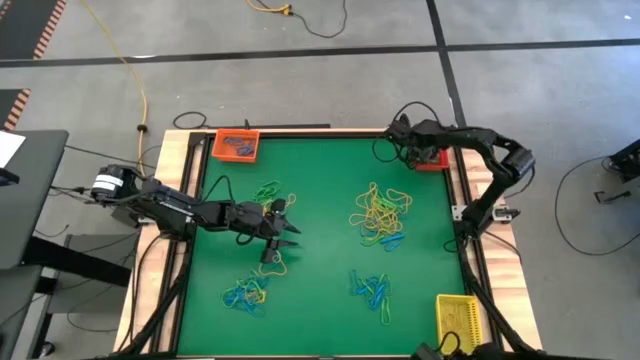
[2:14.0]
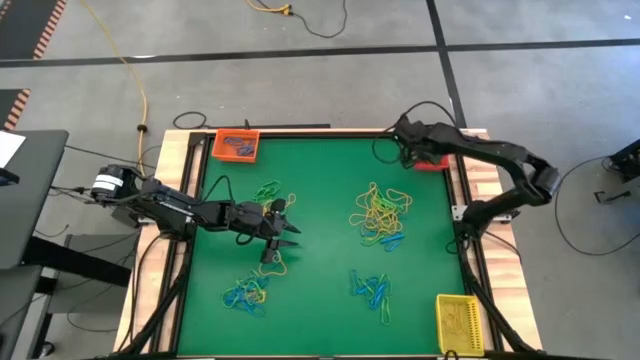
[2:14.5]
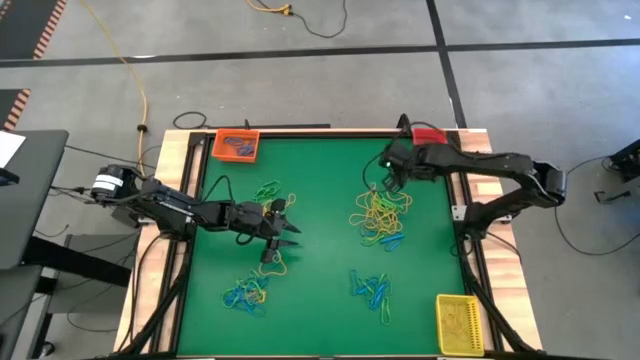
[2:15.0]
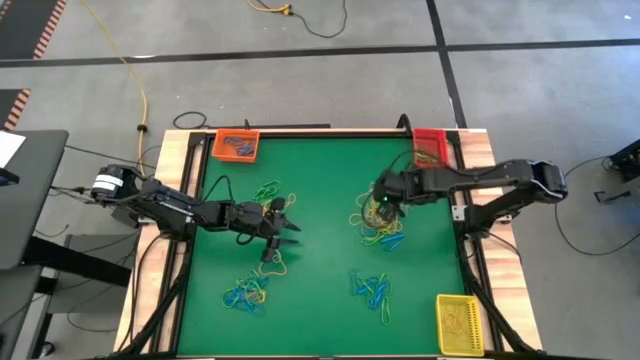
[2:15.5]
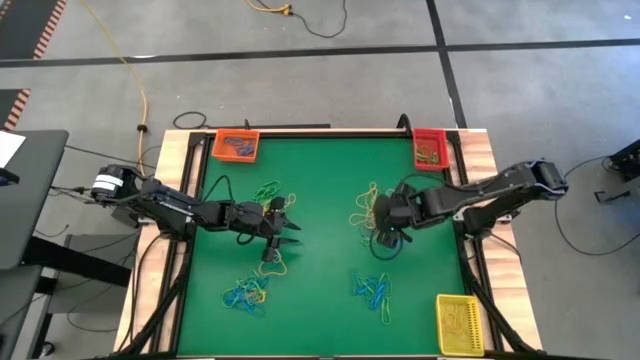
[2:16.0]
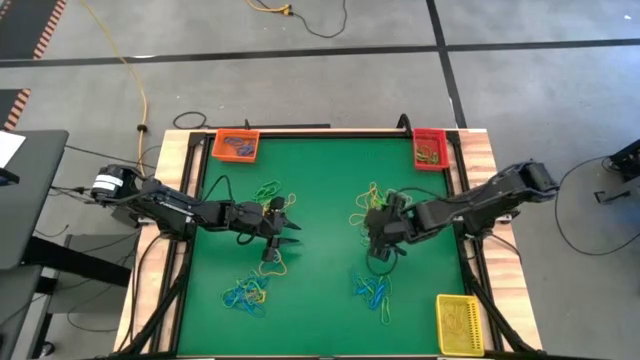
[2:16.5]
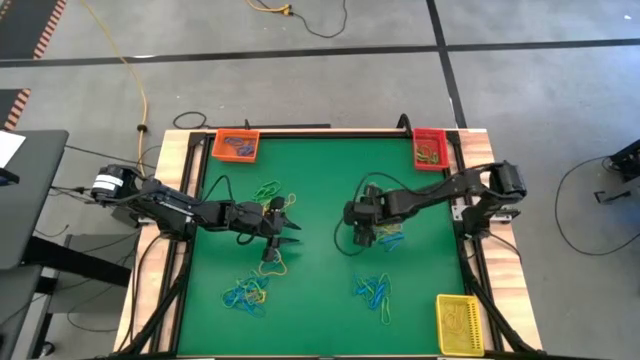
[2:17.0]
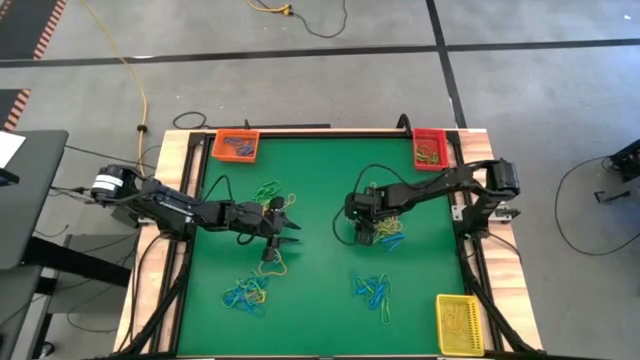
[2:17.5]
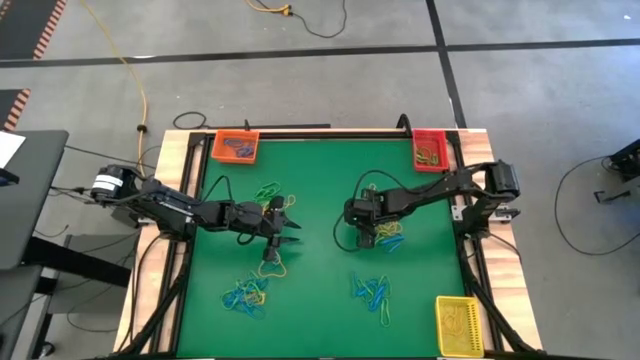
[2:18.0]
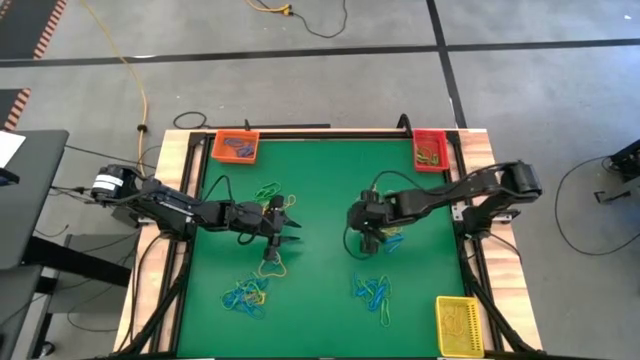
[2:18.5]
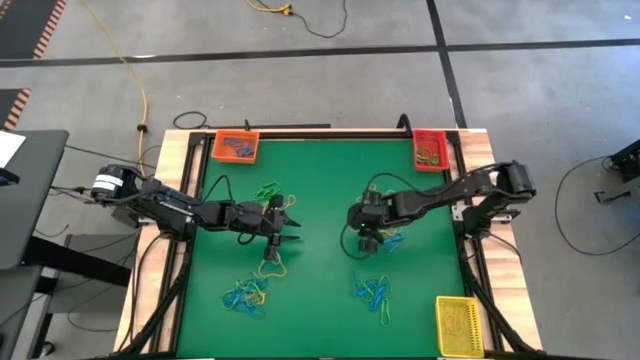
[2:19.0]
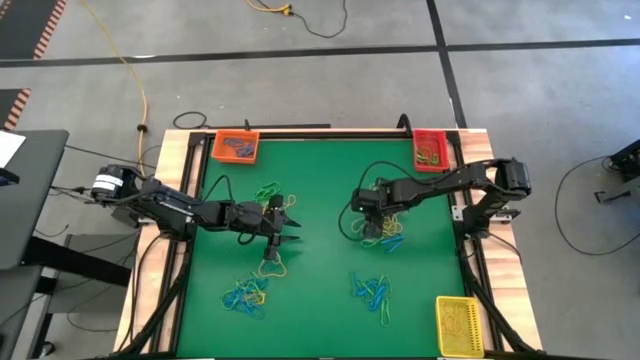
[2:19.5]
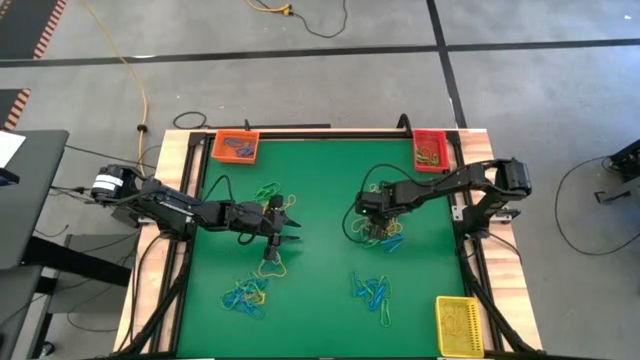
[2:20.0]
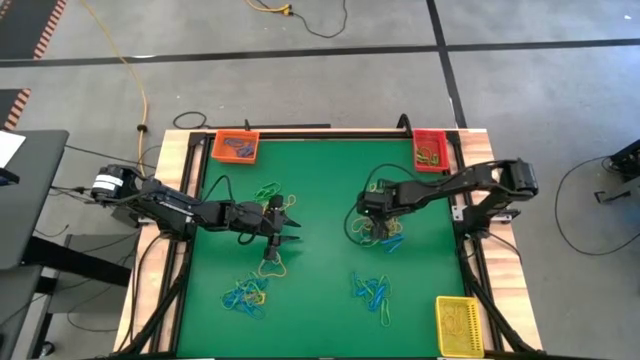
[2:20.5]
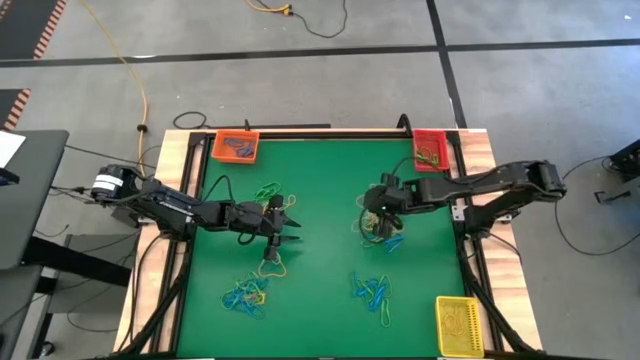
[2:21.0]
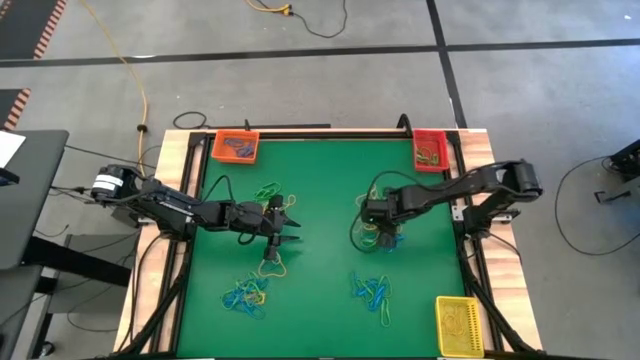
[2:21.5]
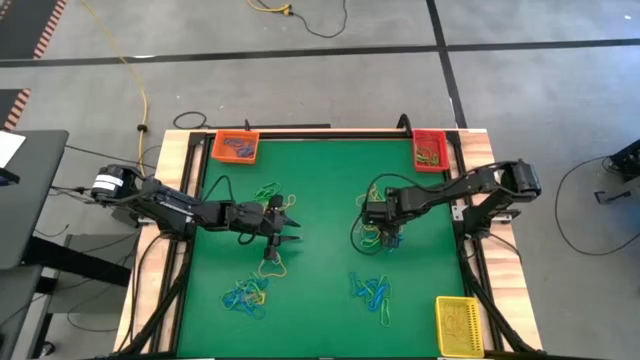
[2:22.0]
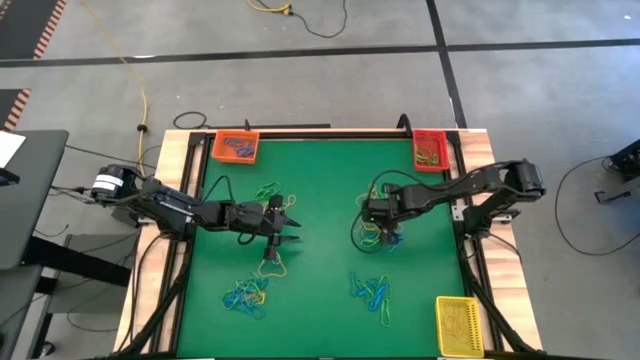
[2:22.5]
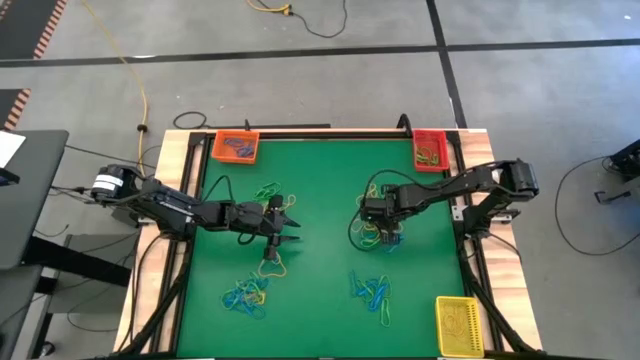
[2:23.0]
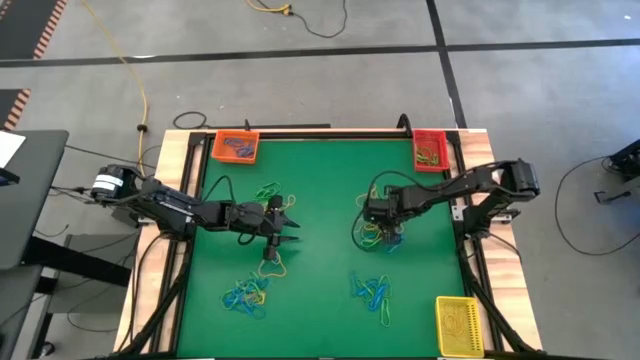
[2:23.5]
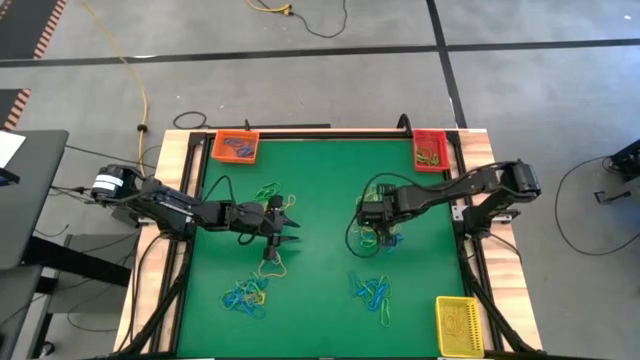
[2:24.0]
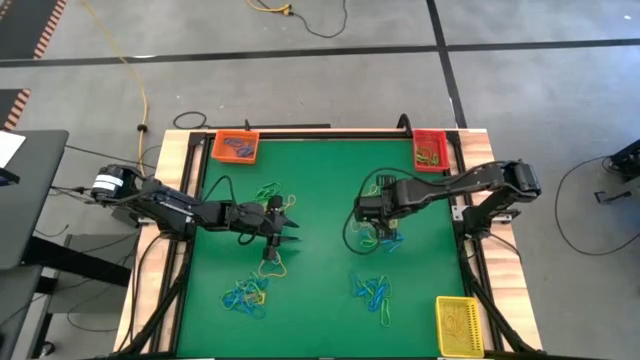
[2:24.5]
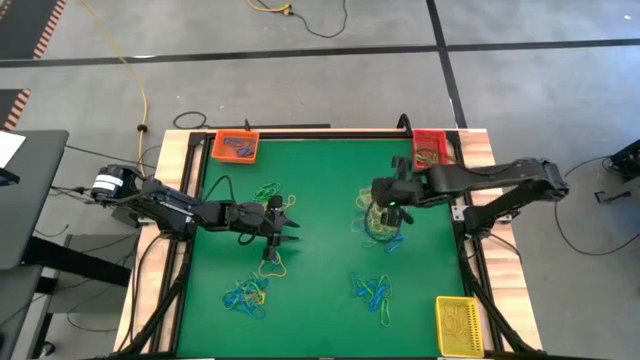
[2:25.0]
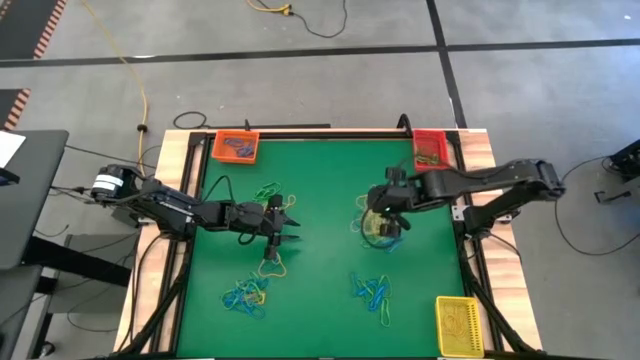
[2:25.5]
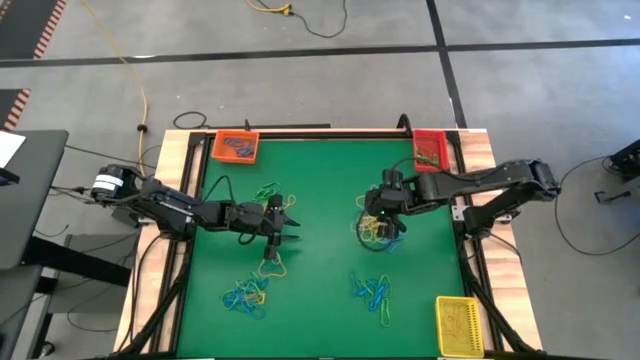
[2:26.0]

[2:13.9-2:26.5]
Task: Sort rubber bands into baskets
Put the top right yellow rubber band into the yellow bin

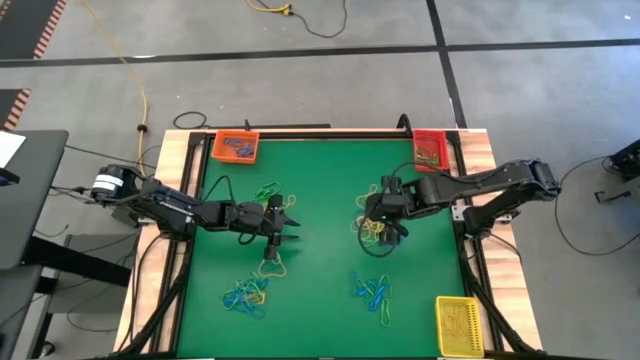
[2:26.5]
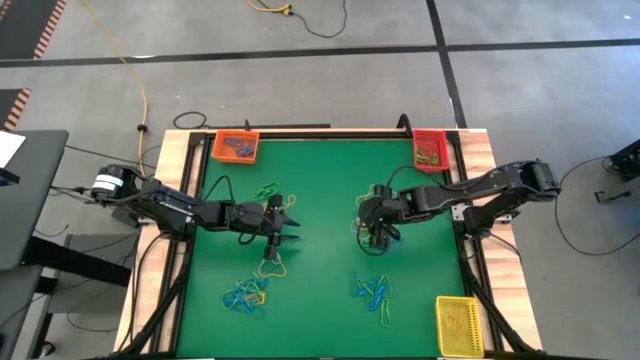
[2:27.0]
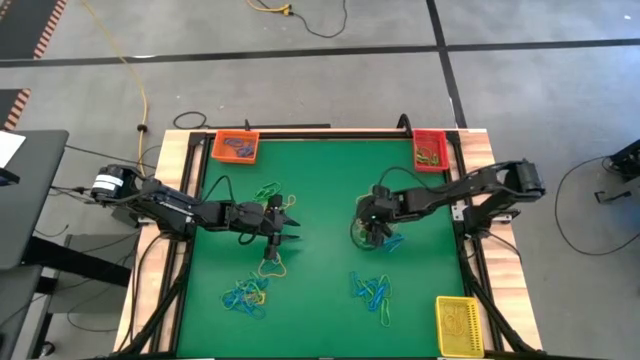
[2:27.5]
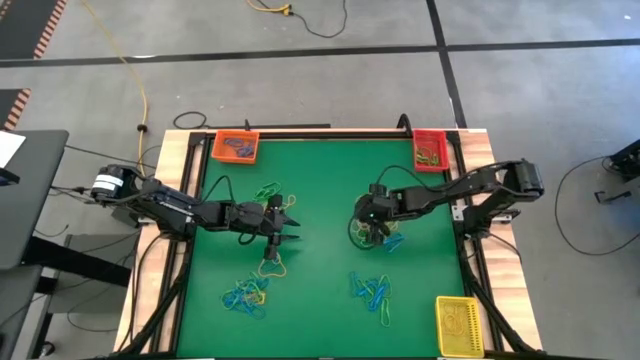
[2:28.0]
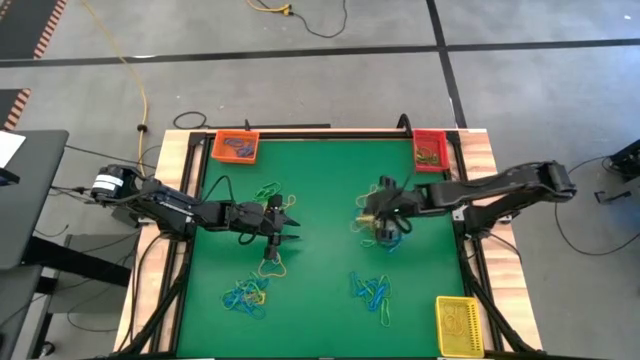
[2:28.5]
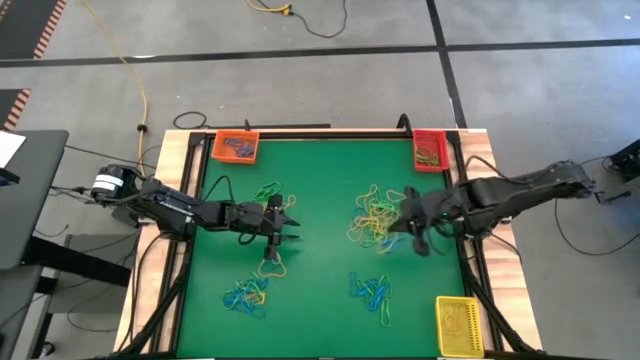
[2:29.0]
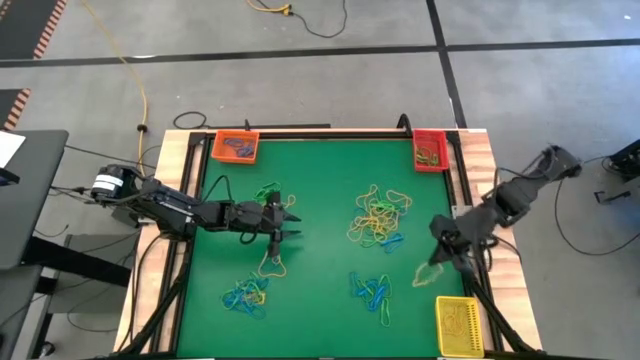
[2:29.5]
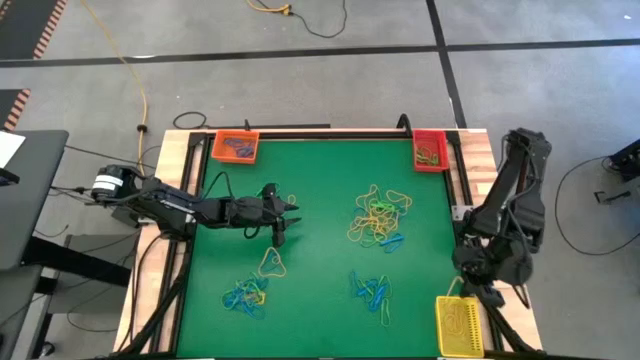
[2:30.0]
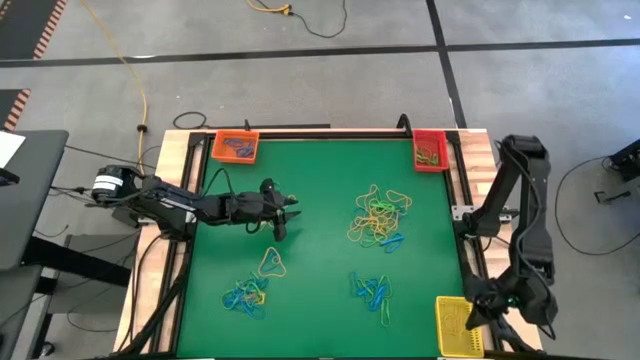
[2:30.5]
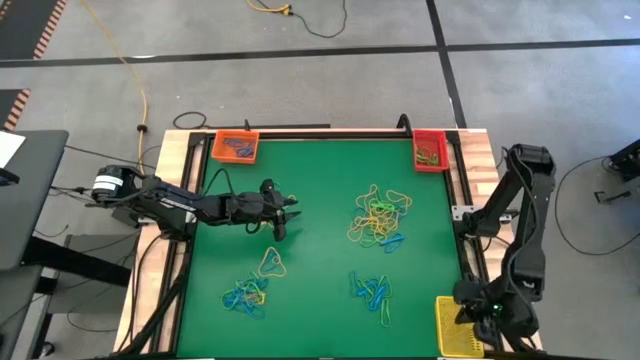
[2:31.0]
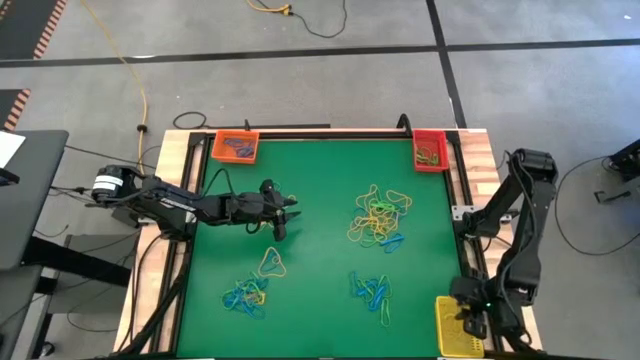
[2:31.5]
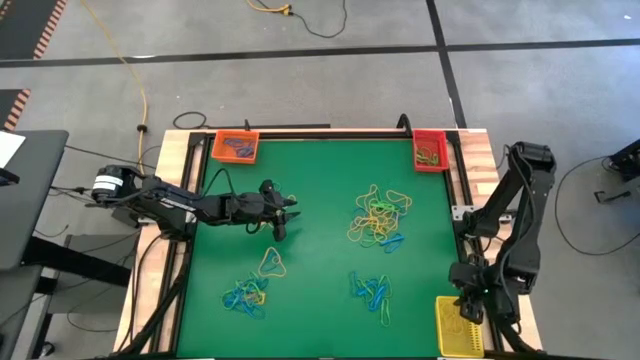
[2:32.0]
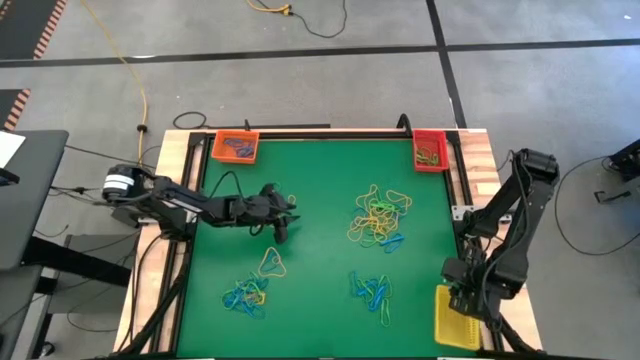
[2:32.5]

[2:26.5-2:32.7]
Put the top right yellow rubber band into the yellow bin
